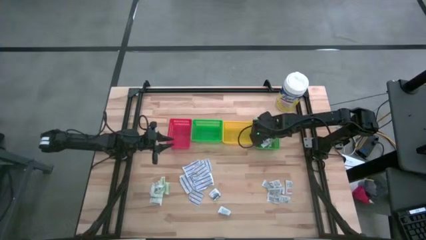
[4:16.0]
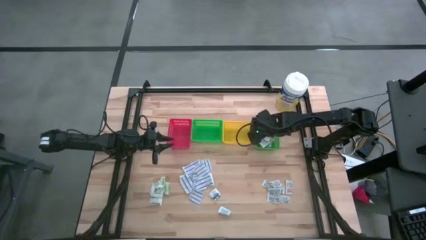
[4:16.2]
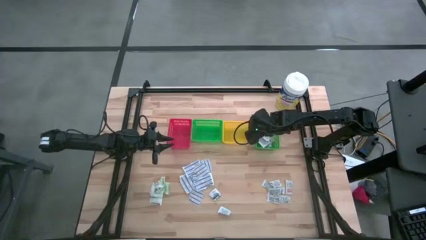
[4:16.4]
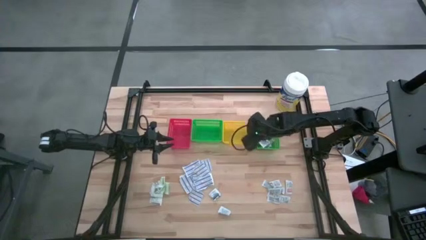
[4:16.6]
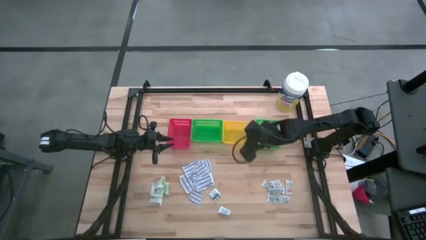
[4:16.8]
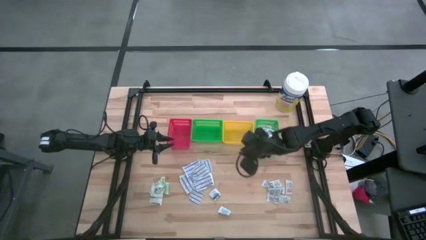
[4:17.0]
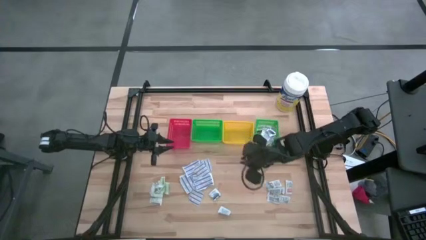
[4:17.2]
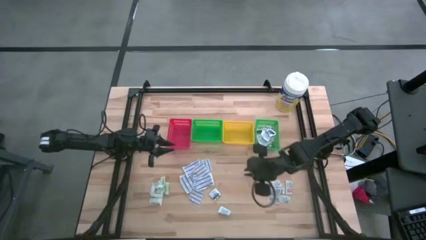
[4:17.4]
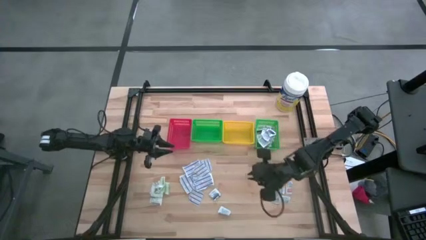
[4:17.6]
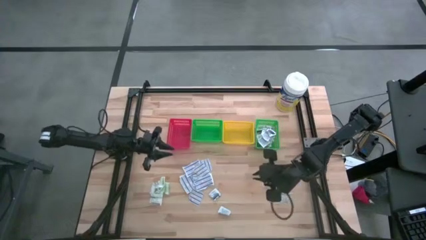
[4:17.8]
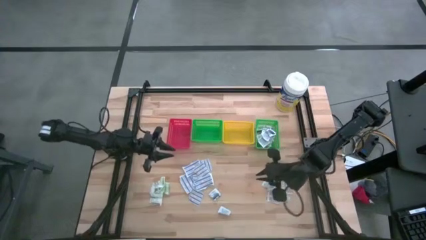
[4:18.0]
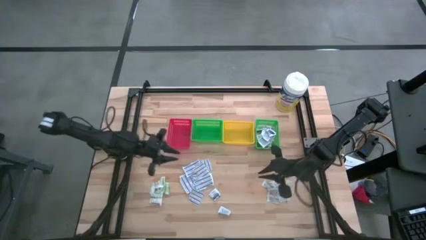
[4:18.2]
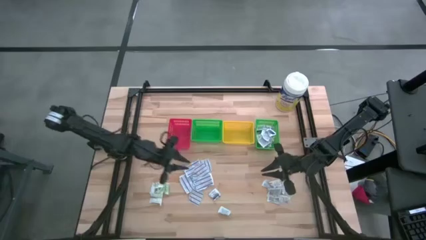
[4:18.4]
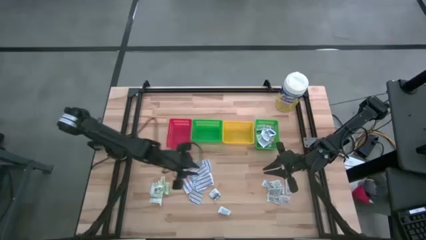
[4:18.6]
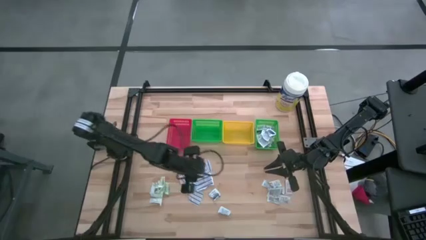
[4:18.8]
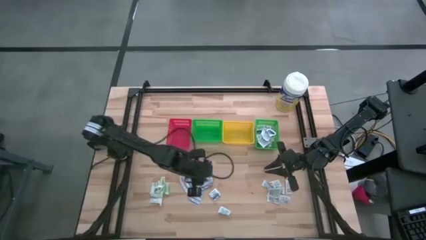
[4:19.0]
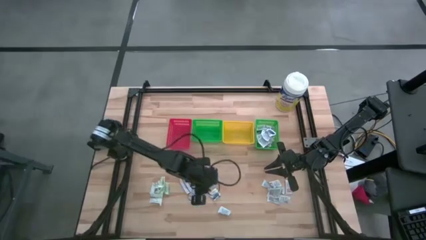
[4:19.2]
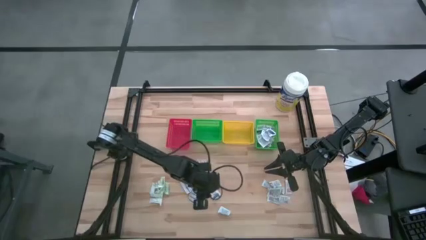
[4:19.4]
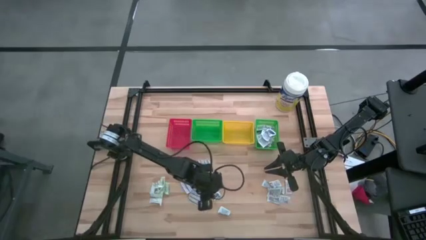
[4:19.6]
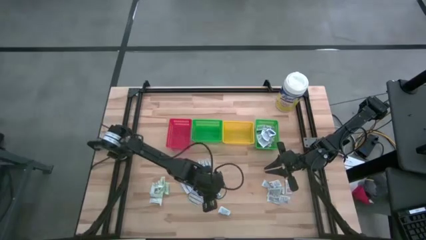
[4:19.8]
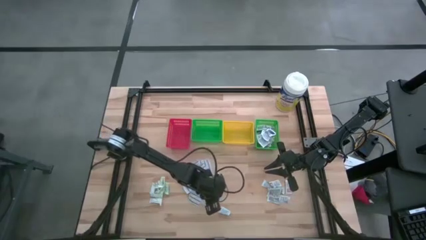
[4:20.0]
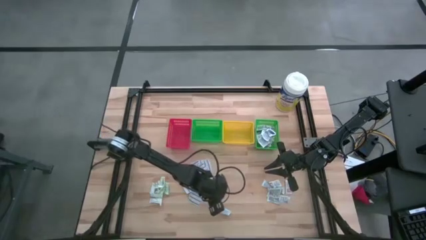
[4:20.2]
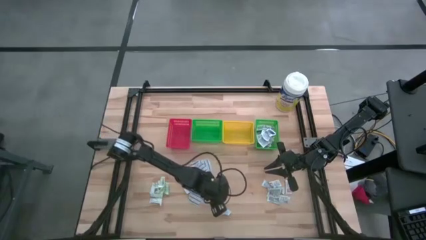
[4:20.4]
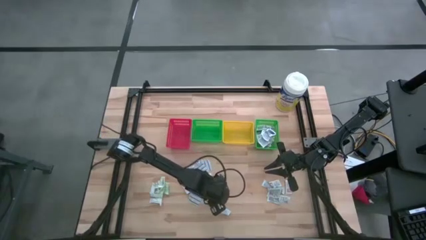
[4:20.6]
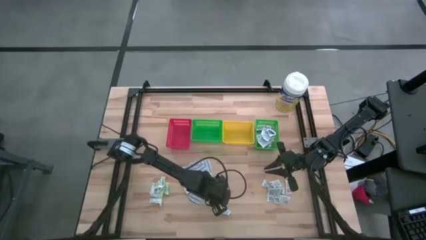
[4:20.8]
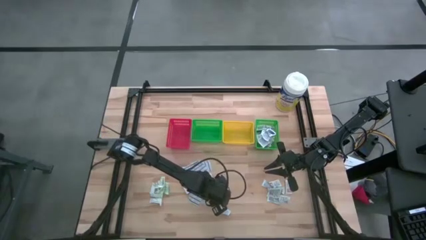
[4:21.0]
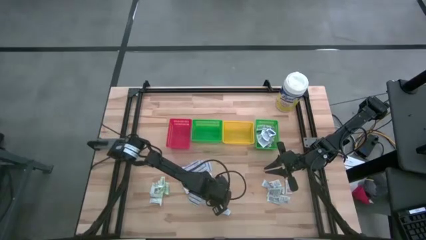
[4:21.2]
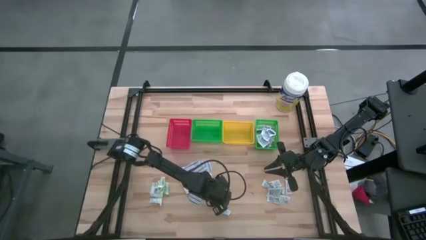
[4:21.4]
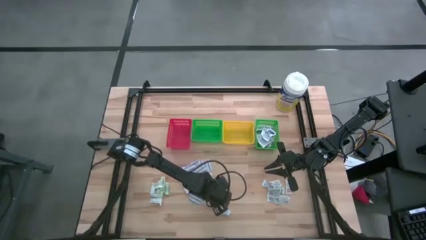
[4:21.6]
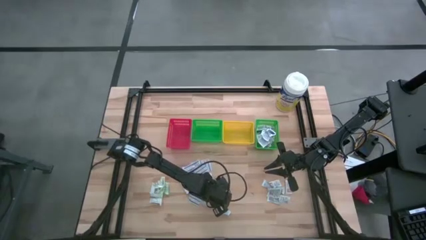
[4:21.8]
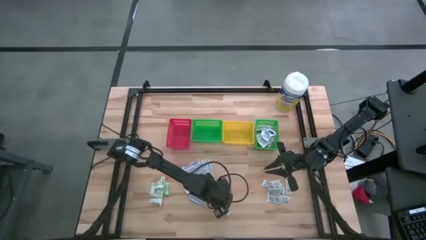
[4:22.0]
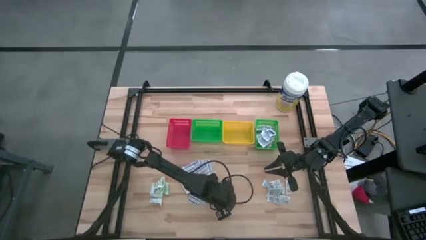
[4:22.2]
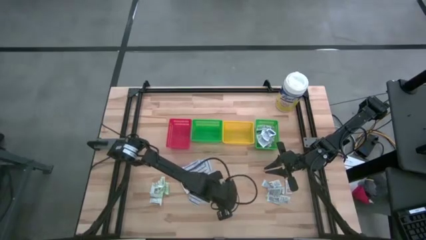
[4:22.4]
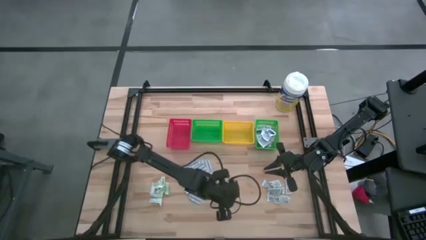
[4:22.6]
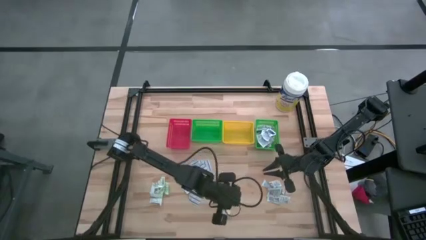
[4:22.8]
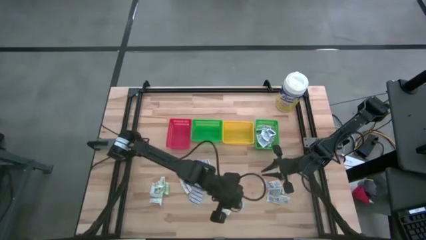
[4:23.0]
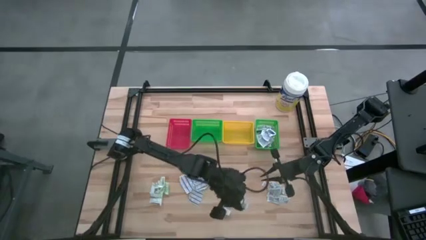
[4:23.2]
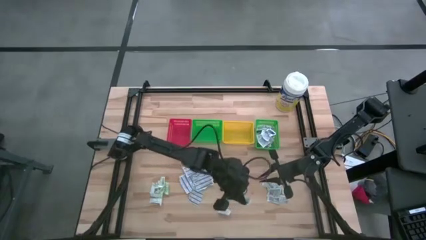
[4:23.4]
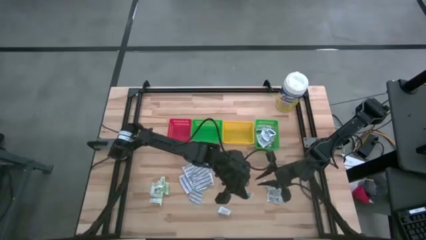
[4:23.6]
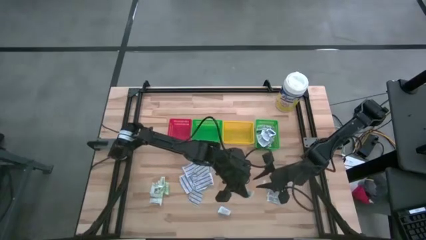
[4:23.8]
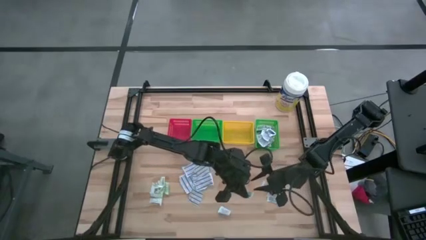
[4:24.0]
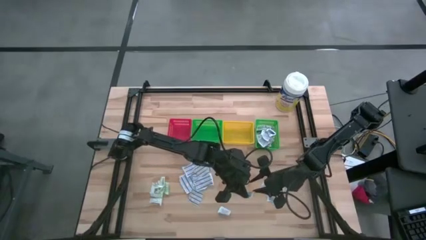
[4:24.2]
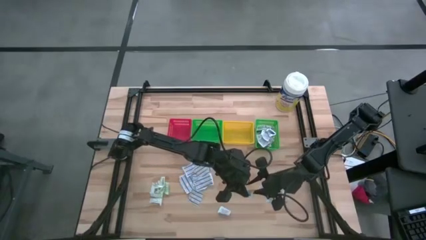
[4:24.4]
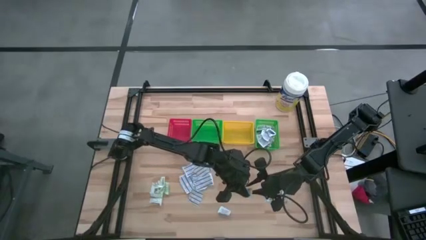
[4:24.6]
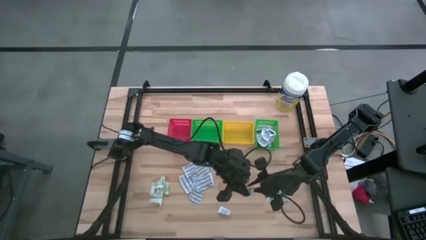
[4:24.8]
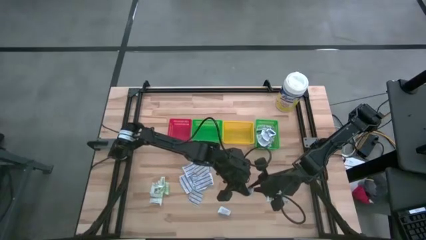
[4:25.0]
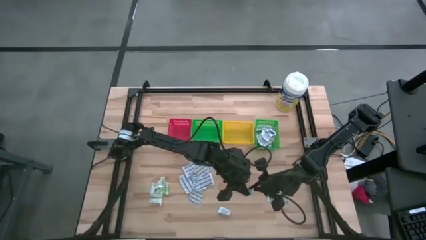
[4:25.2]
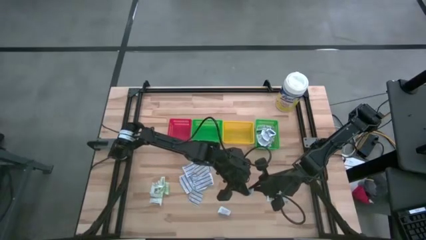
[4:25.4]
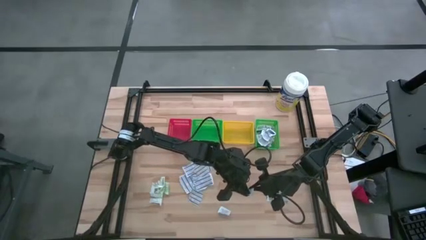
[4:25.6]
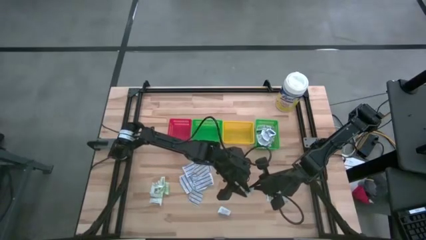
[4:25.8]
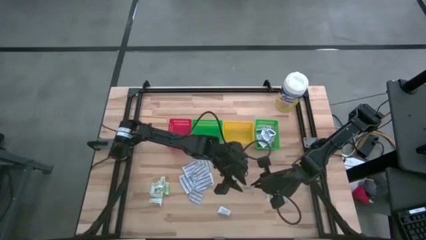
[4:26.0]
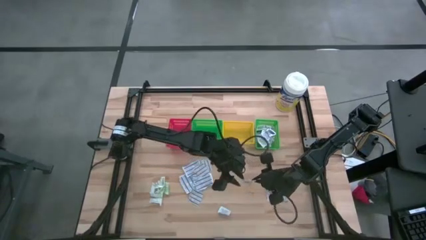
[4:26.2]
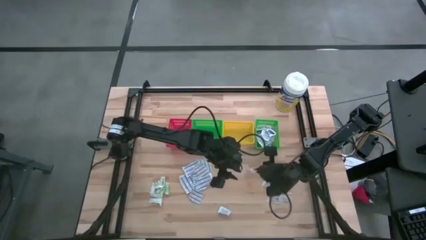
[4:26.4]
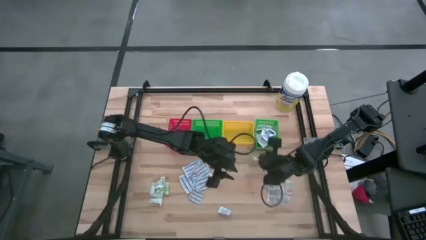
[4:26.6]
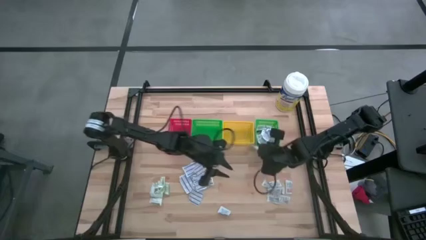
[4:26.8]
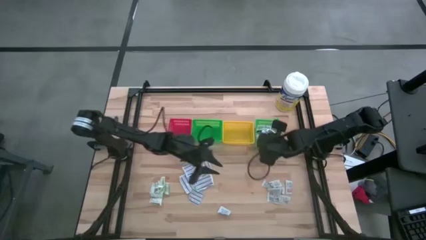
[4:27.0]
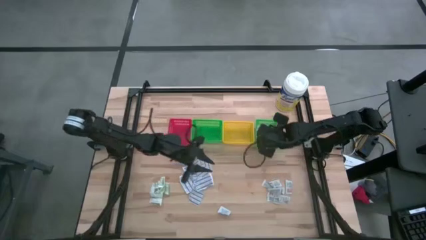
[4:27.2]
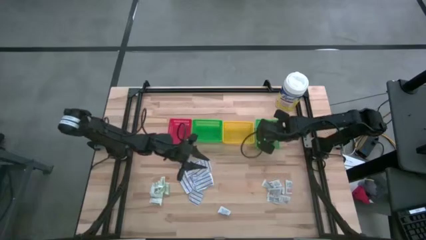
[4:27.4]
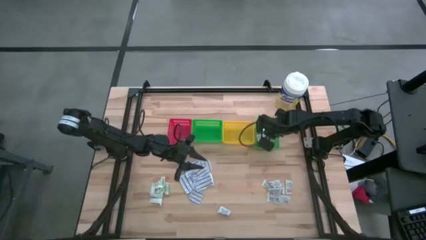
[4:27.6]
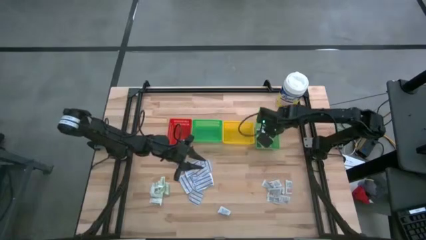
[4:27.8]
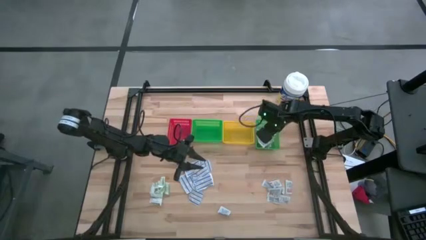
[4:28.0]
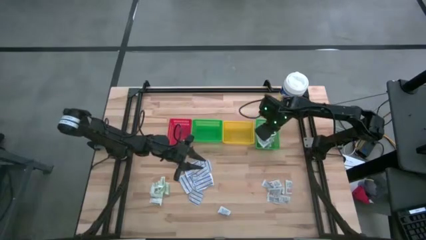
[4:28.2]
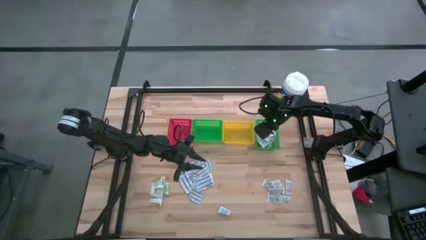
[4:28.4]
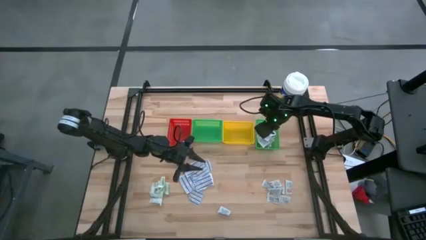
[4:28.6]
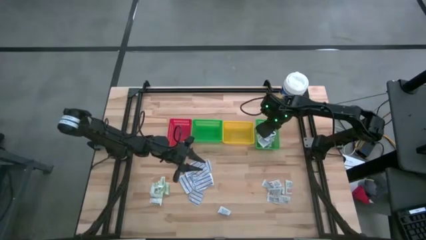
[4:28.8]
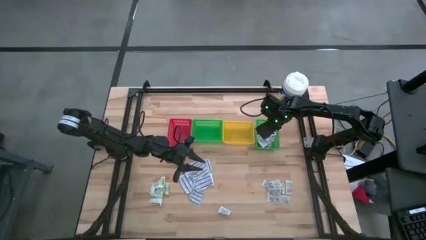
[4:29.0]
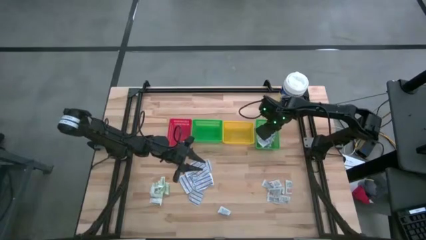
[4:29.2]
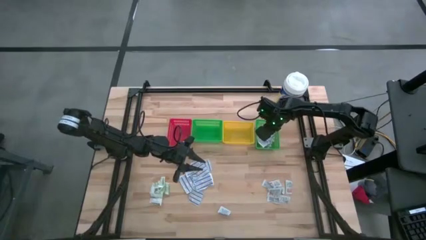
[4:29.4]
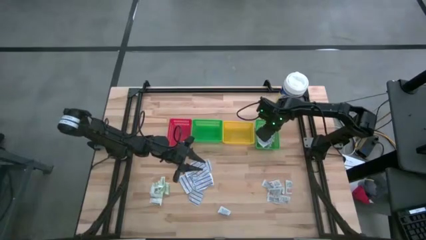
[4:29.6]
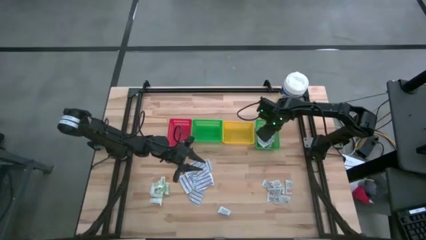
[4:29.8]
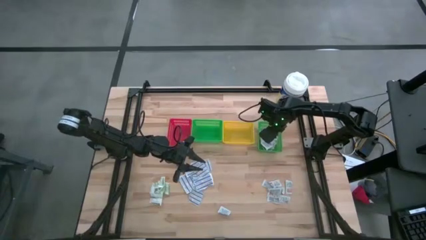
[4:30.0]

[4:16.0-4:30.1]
Task: Pick & Place First Aid Supplies
Put the blue alcohol pad into the right green bin

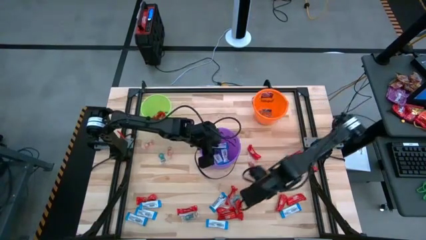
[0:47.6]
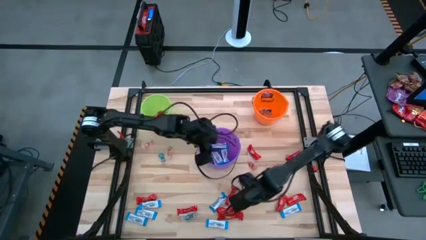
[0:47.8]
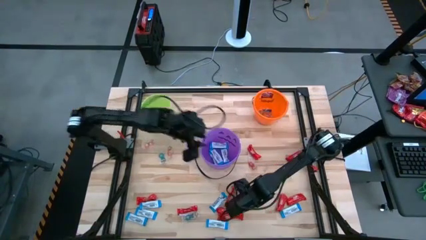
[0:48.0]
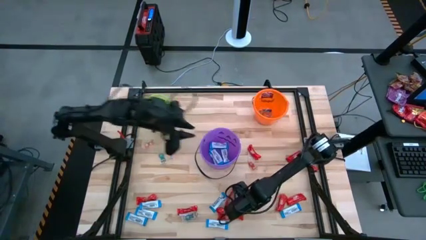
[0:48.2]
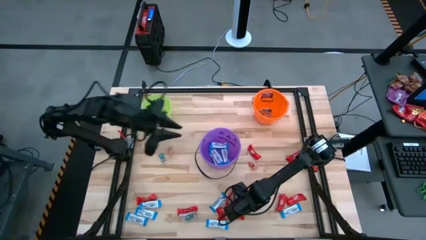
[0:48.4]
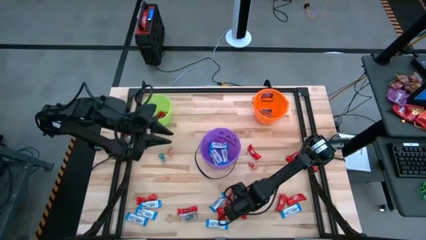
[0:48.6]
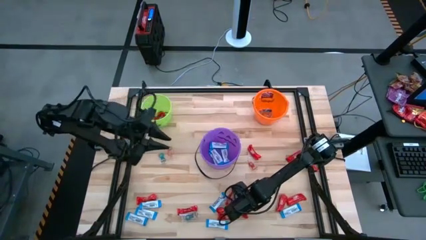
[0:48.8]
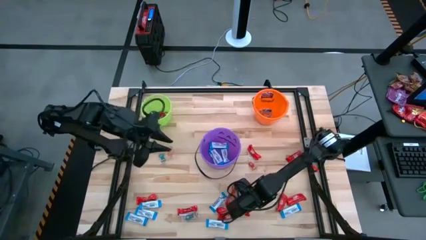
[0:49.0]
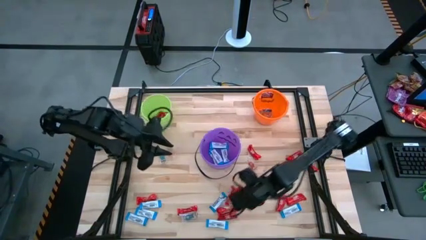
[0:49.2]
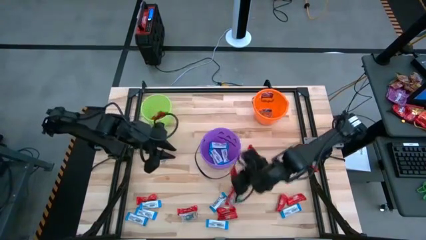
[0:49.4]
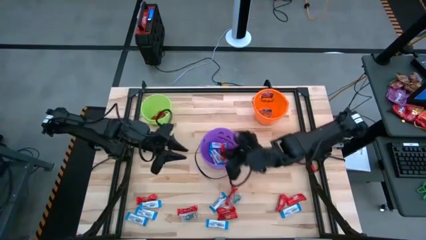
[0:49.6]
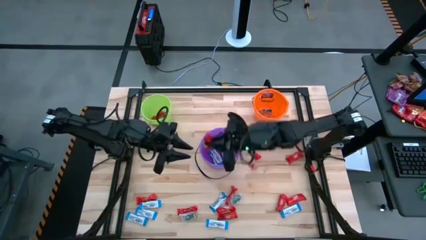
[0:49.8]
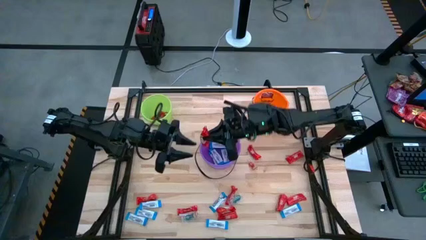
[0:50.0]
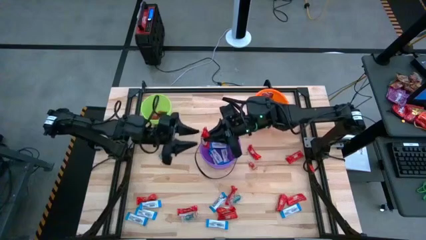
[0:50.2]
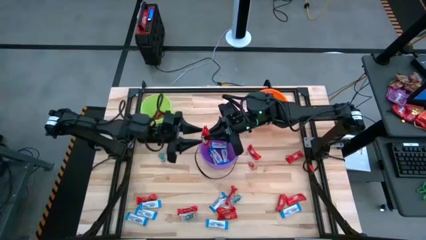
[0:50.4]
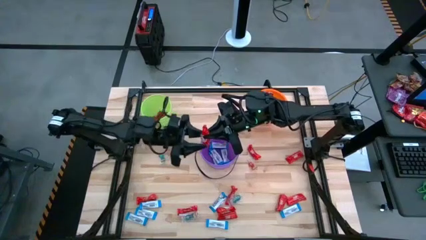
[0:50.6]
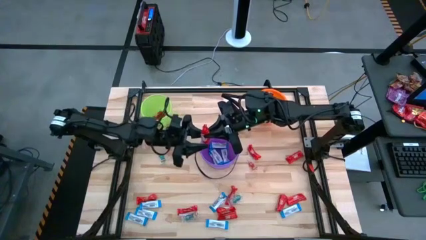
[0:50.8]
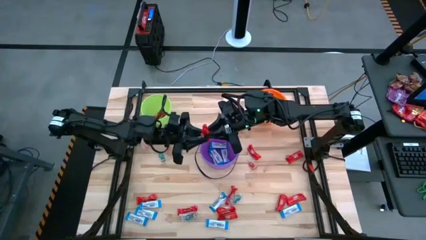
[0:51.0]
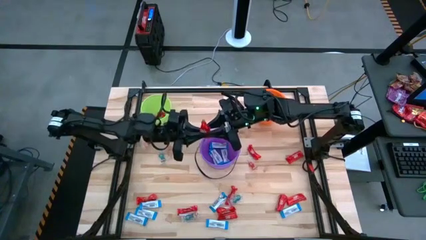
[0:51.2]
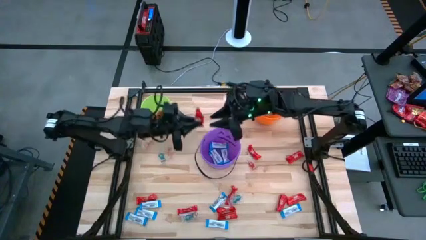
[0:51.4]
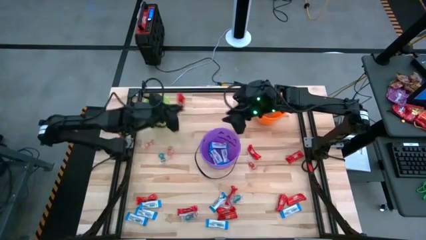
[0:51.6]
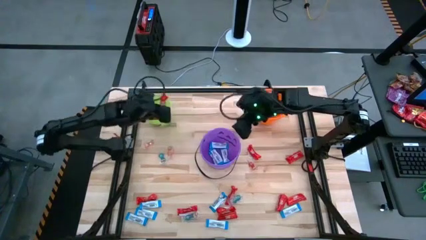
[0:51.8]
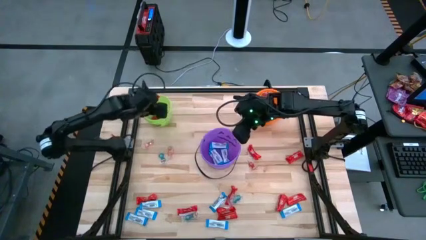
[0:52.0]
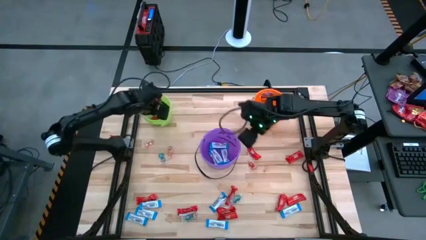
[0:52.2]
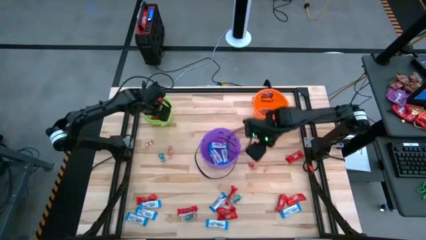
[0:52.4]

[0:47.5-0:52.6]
Task: Sort candy by brand, put in halloween buckets
Put the red chocolate into the green bucket
